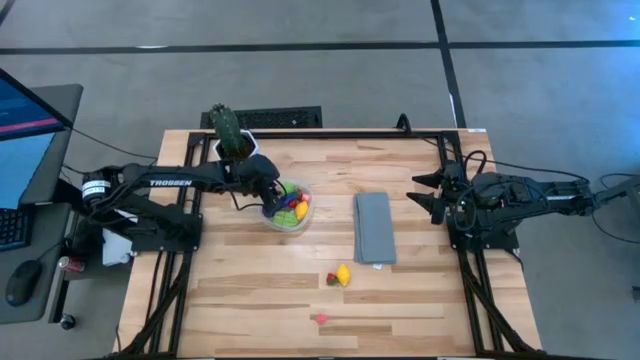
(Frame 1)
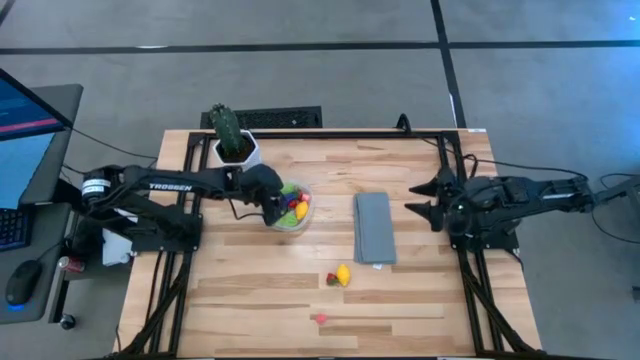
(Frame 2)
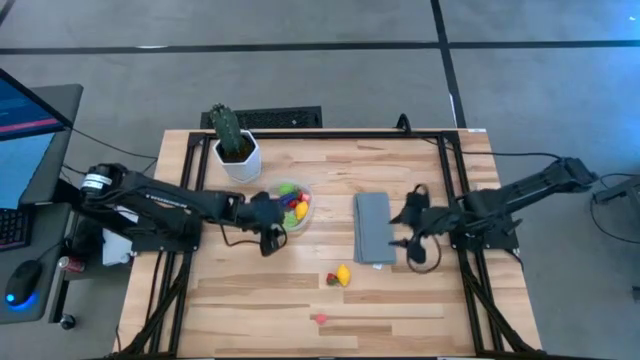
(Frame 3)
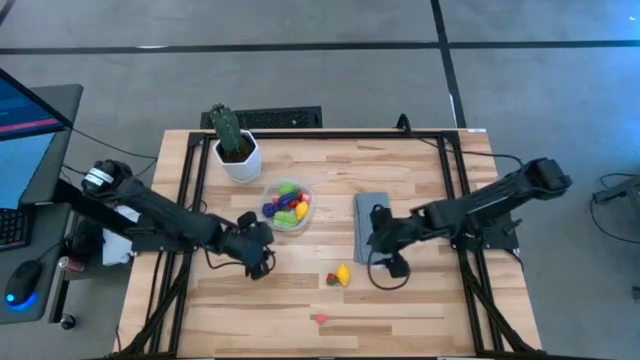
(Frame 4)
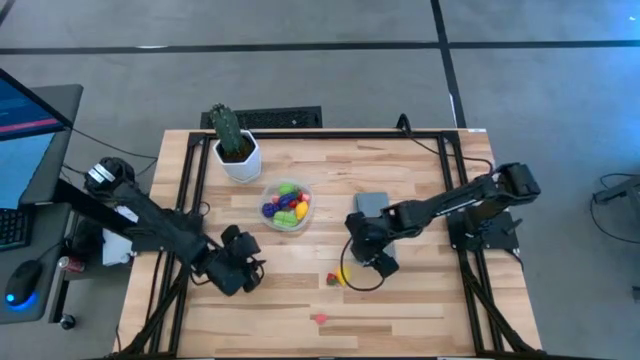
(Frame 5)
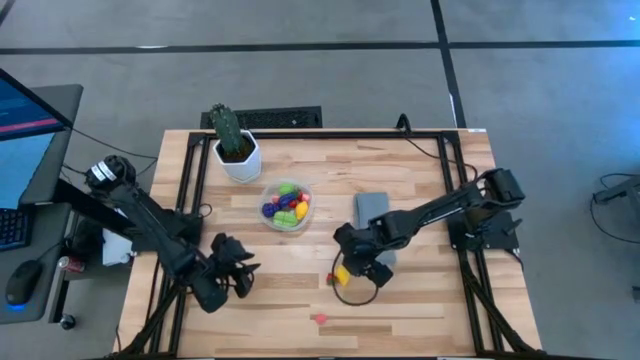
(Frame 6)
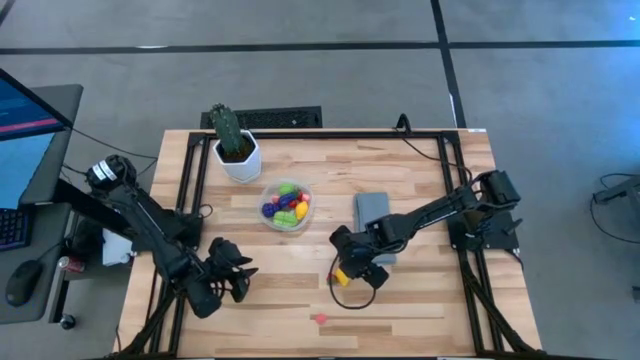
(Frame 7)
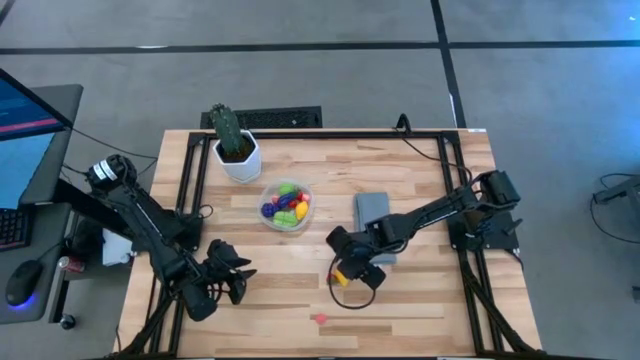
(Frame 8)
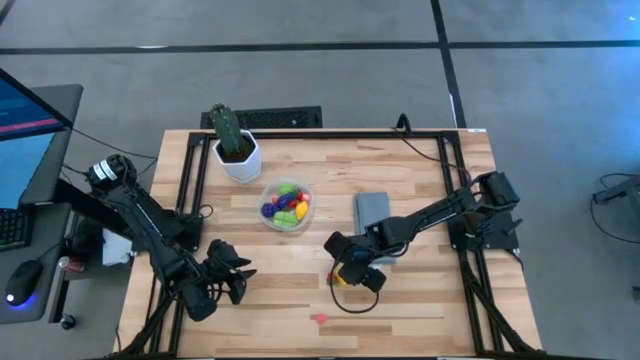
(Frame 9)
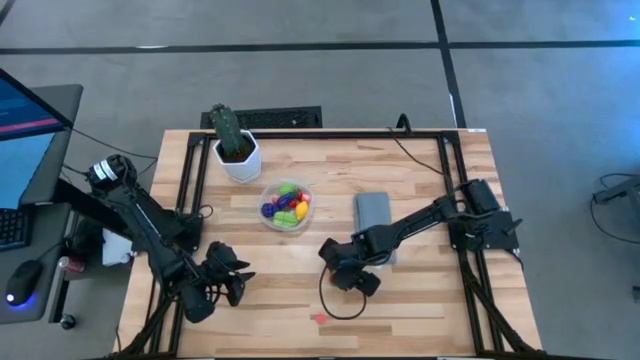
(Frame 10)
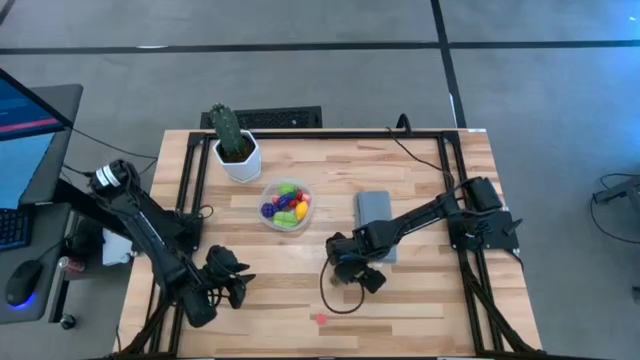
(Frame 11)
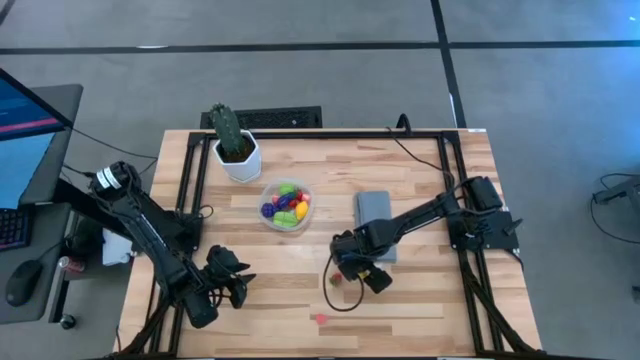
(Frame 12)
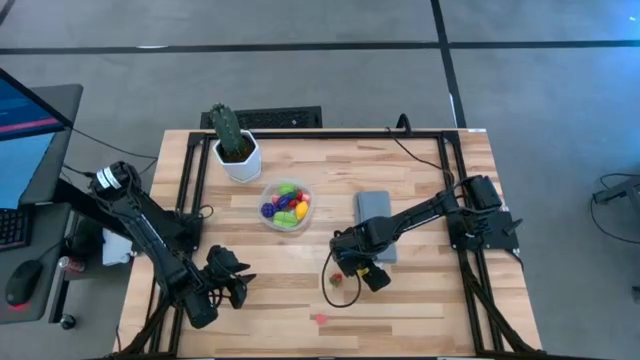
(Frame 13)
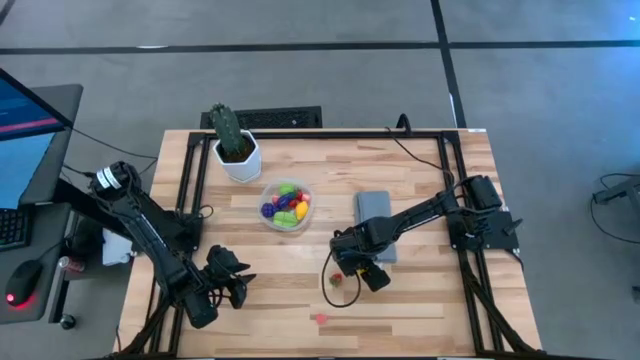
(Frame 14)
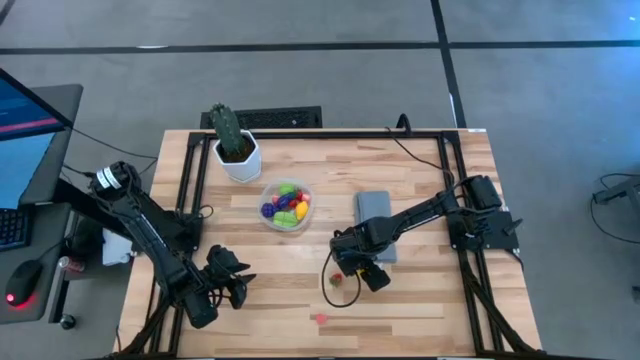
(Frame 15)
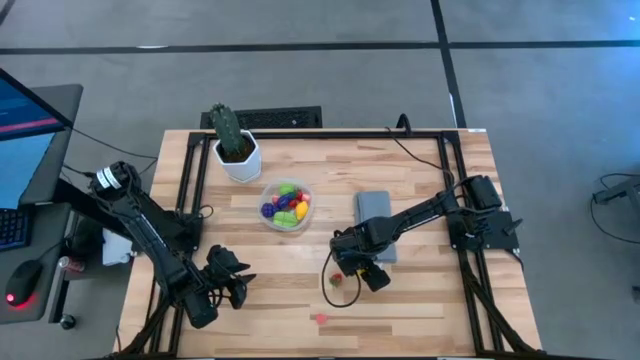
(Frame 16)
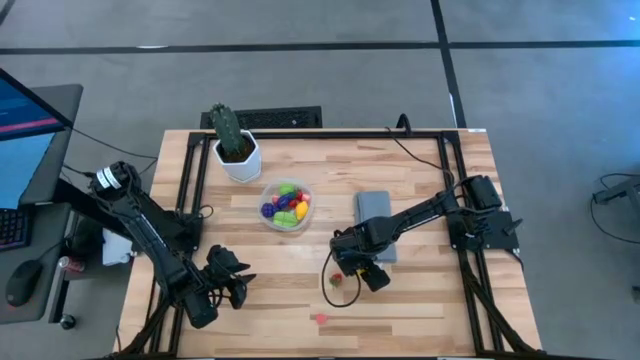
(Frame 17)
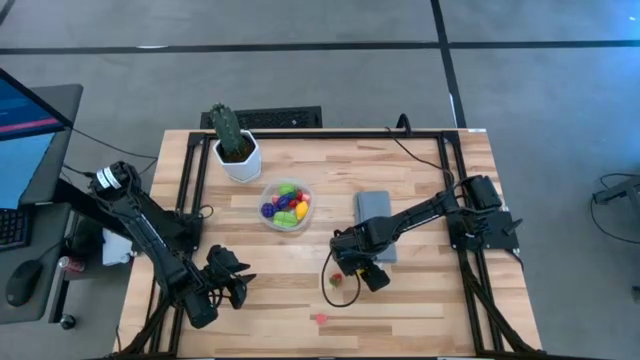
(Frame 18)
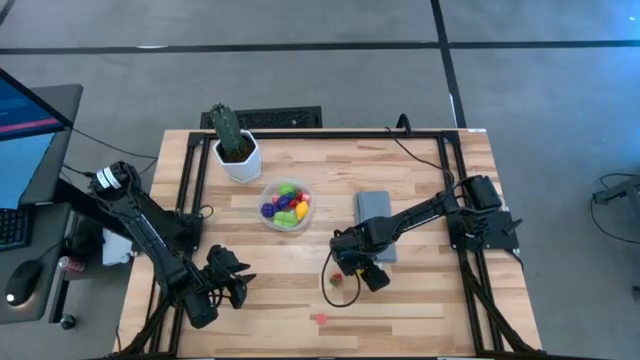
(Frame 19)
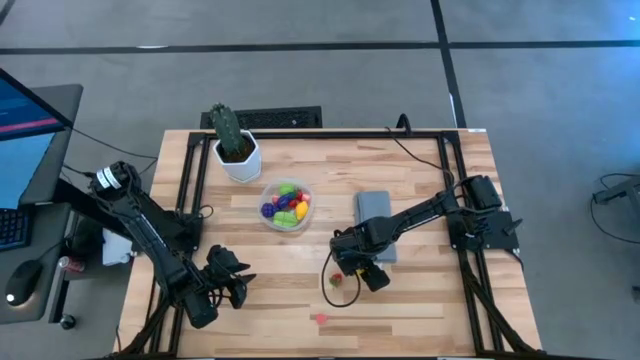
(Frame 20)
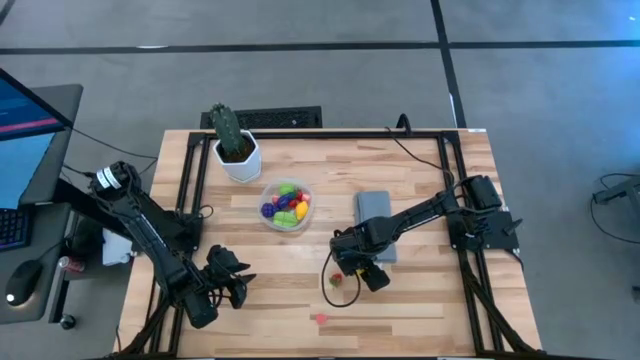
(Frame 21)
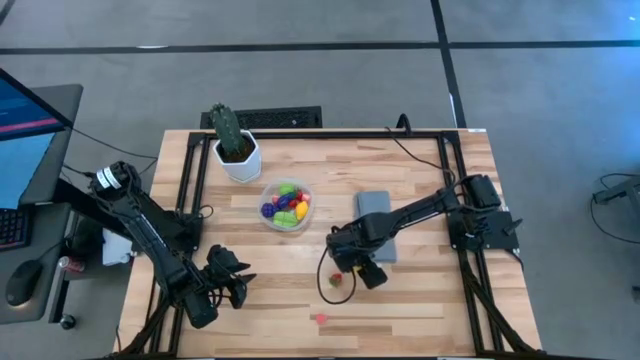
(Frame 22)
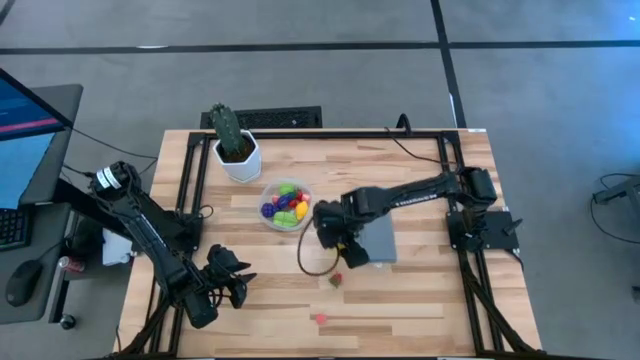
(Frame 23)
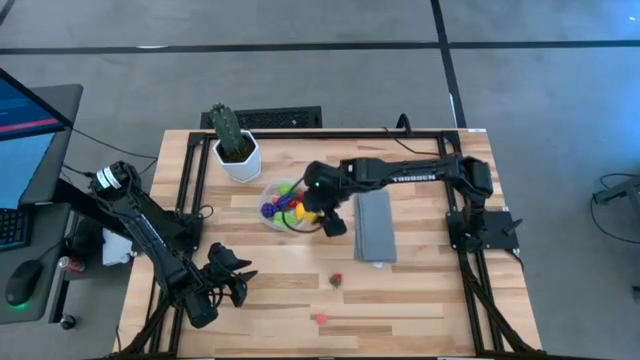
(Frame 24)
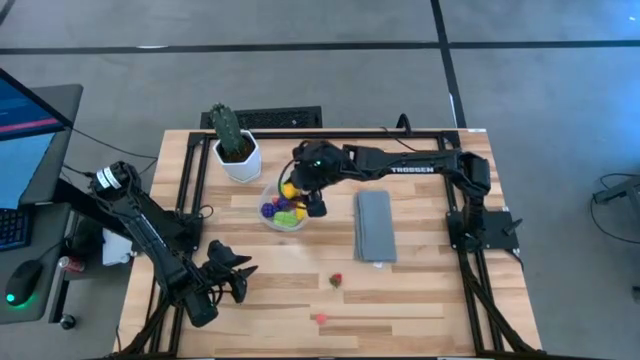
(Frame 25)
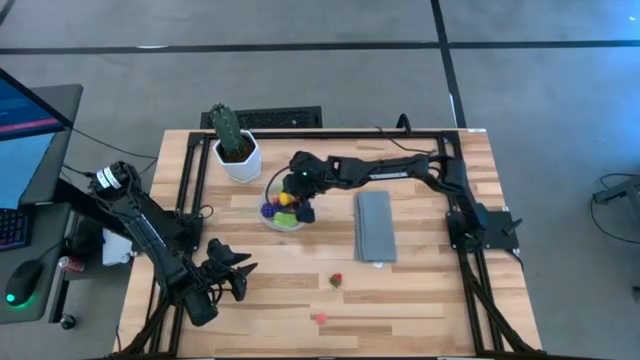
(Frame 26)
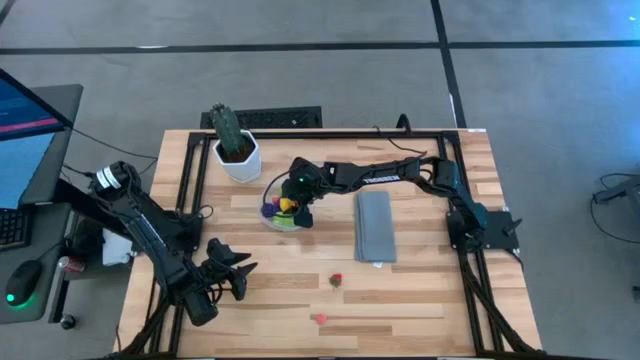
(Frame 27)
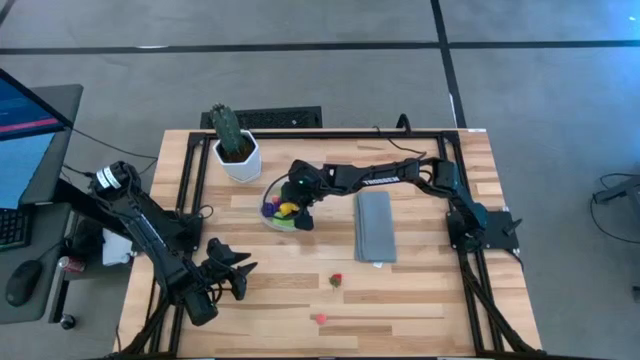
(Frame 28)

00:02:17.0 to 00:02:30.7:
Task: Pick and placing Produce into tupperware
Put the yellow lemon into the transparent container

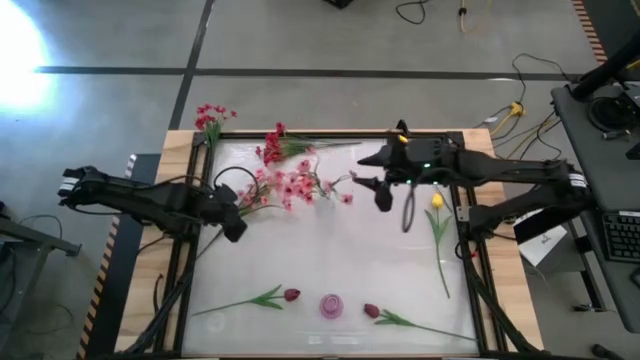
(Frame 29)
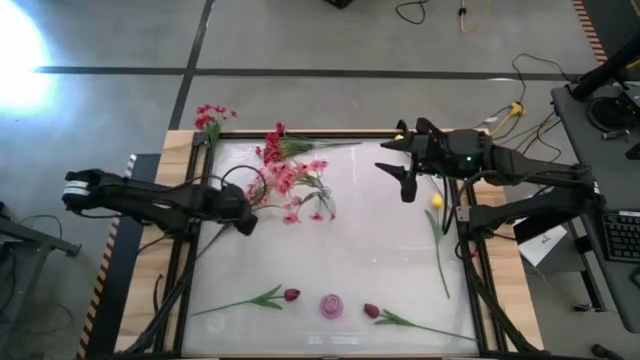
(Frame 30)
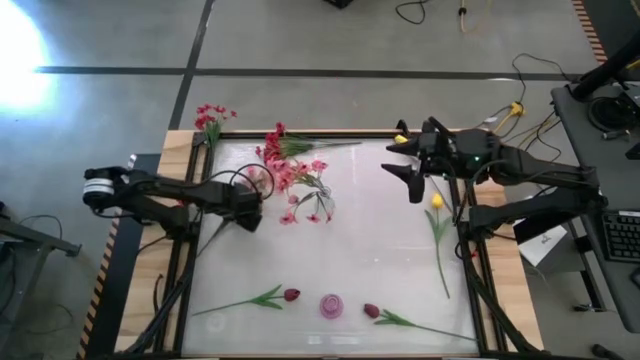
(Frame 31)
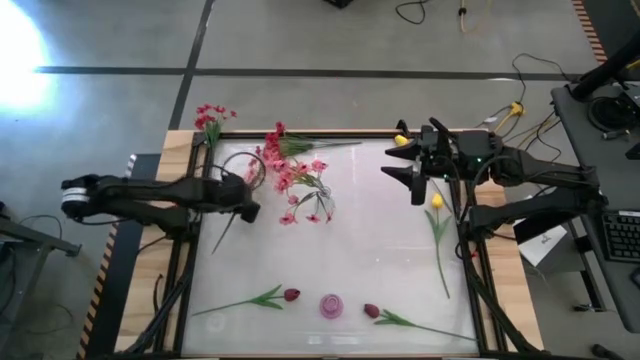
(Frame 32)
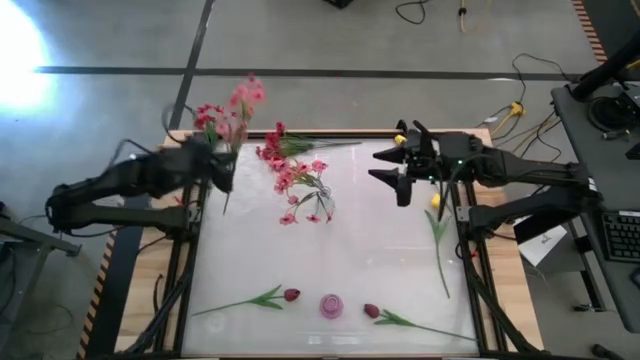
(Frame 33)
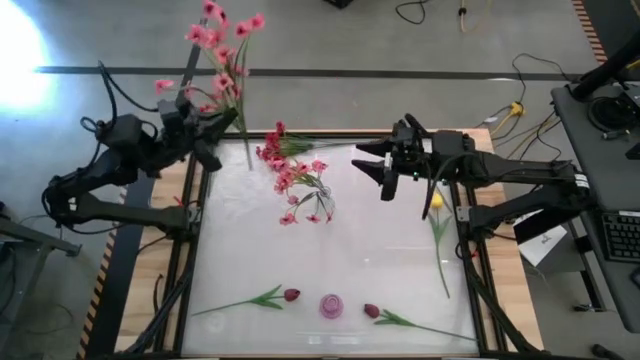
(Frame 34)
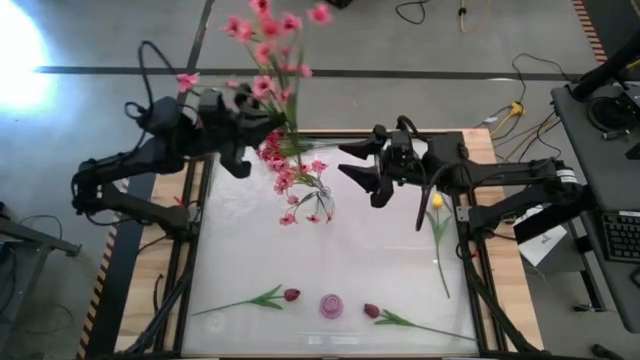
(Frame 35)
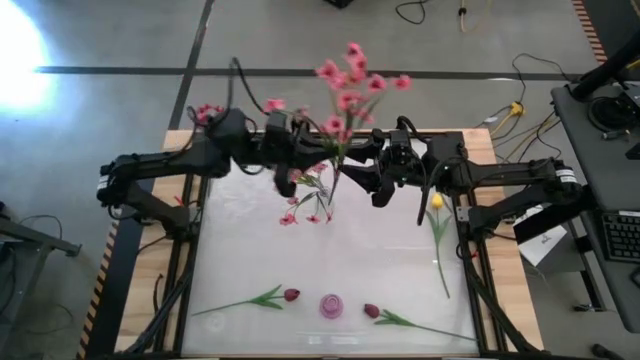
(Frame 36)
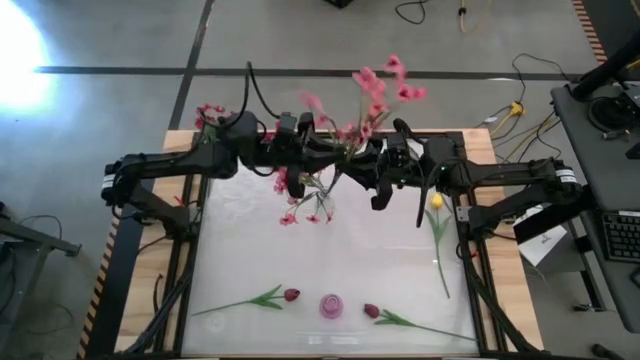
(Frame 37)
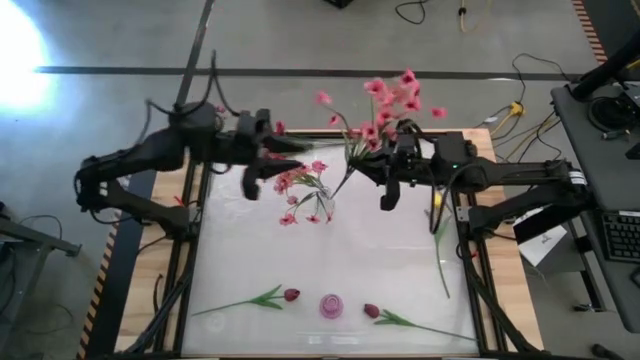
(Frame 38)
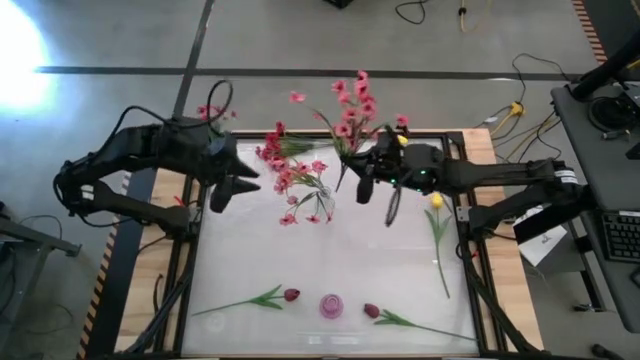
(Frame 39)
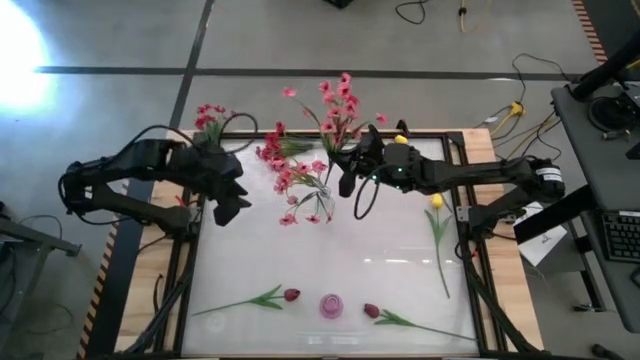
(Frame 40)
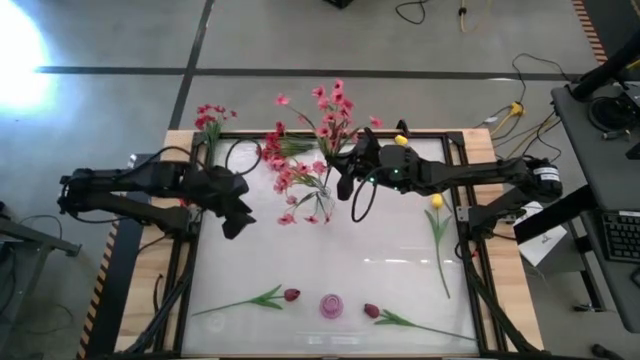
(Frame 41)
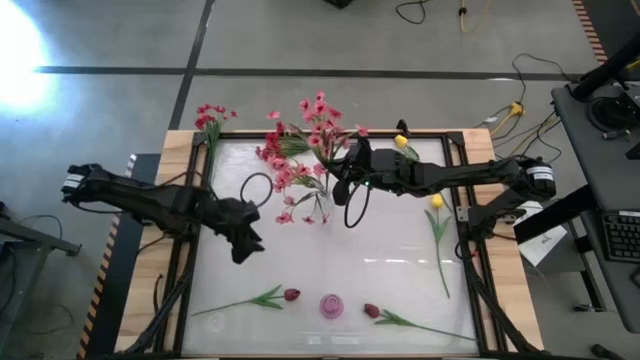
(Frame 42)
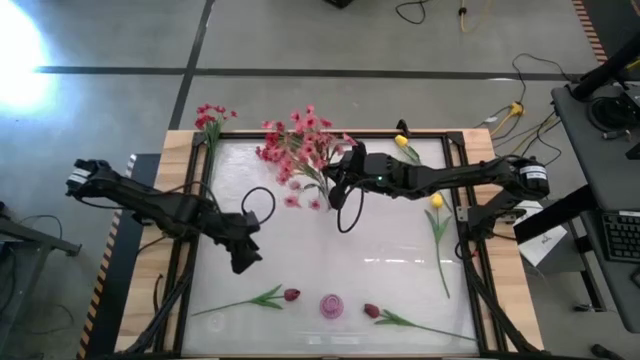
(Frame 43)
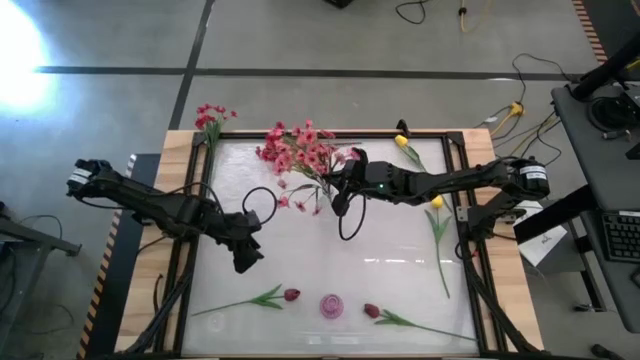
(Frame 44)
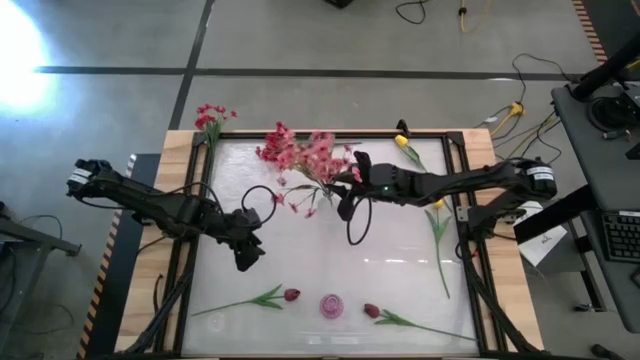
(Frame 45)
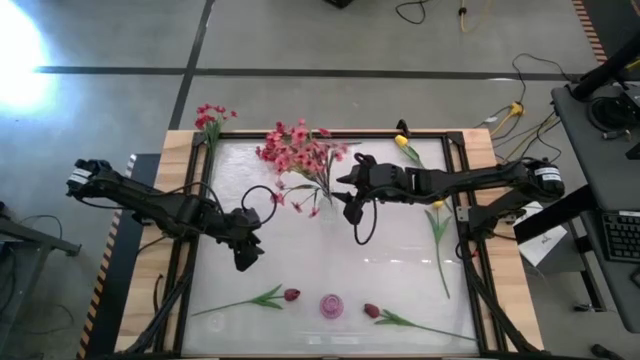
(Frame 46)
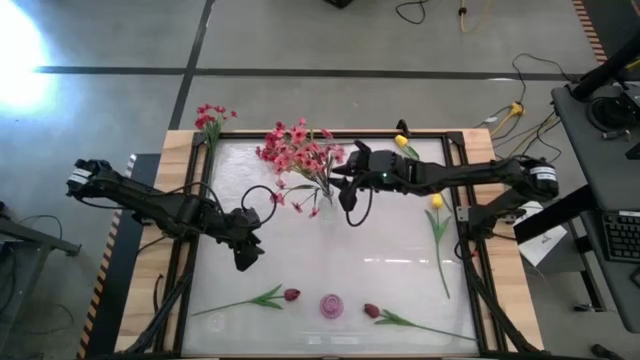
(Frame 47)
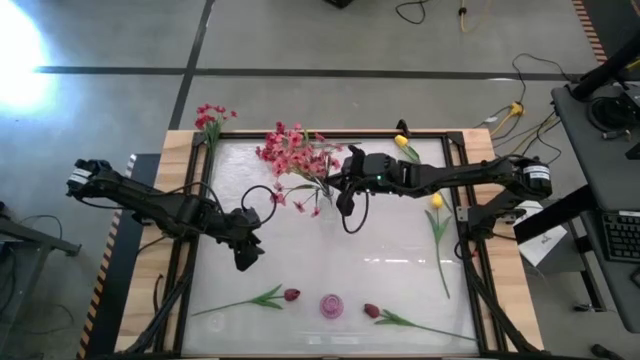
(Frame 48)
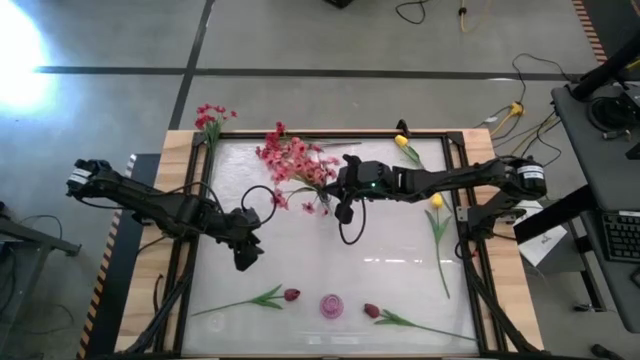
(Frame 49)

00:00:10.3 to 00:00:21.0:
Task: Sort flowers into vase by color
Put the pink flower into the transparent vase
